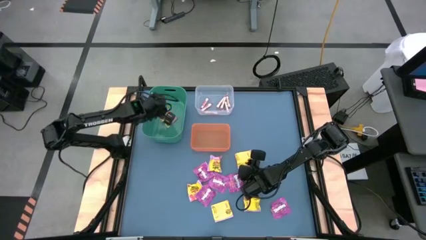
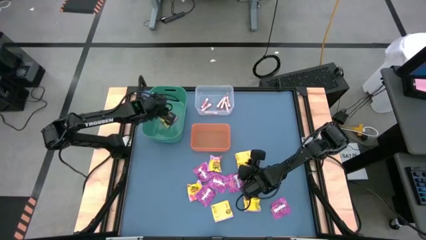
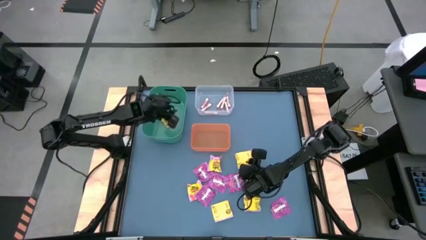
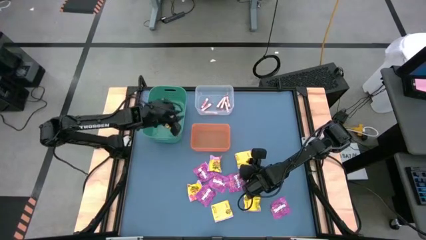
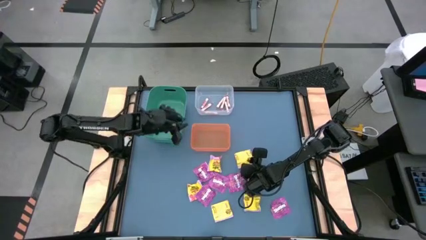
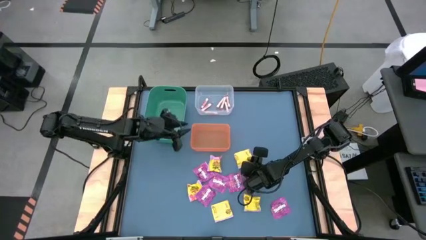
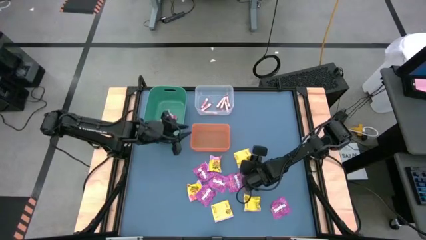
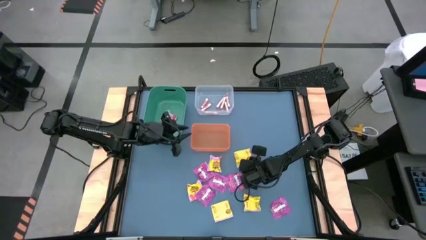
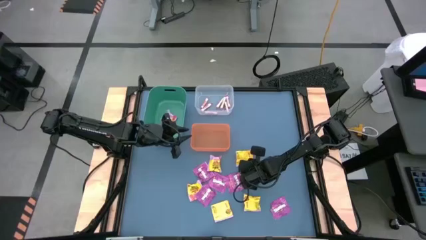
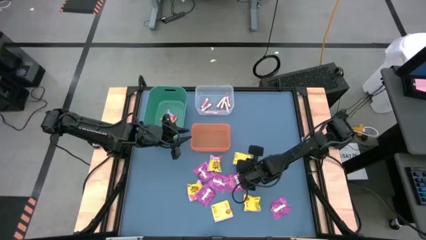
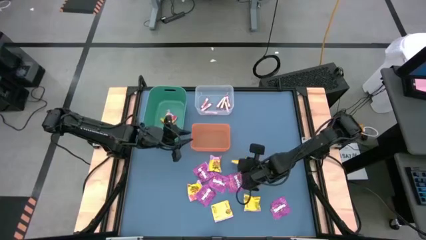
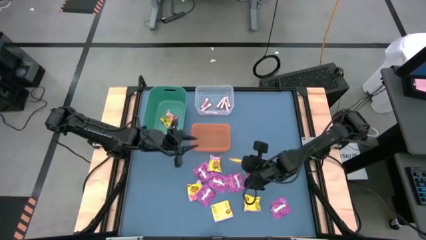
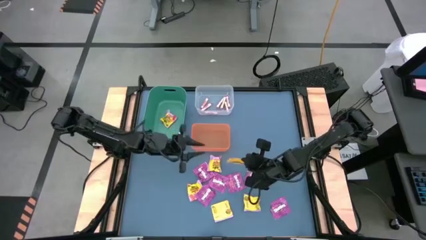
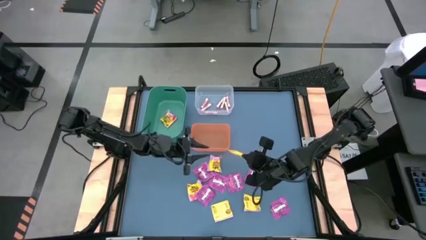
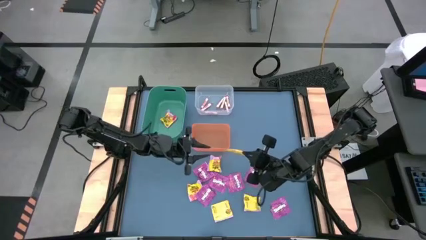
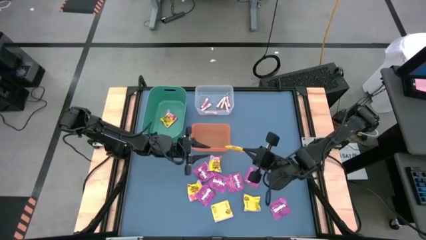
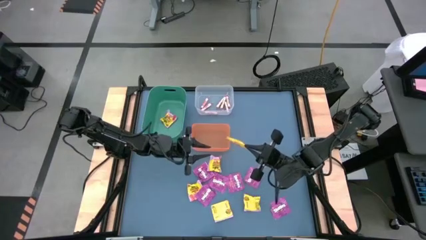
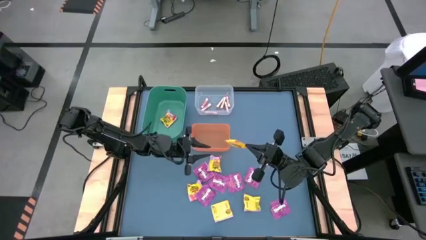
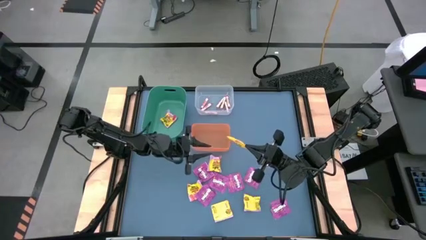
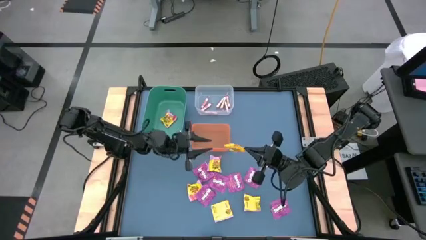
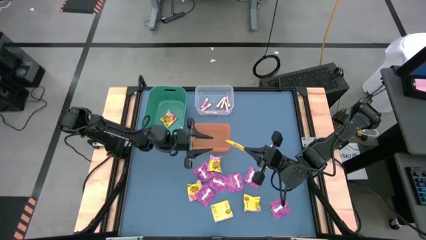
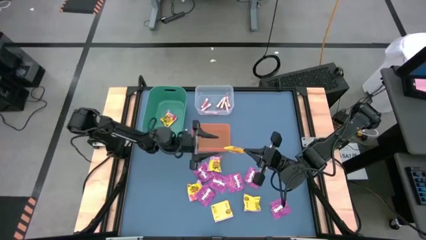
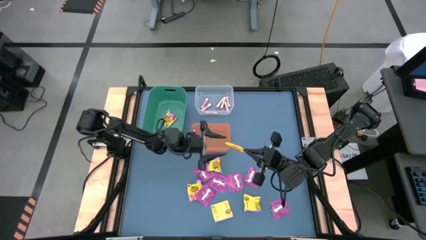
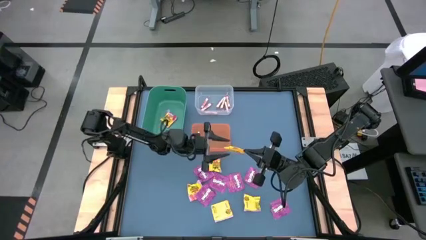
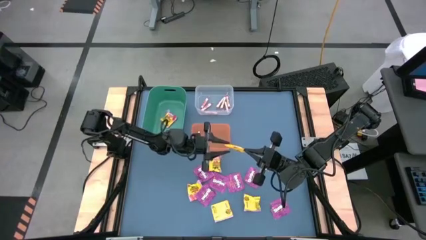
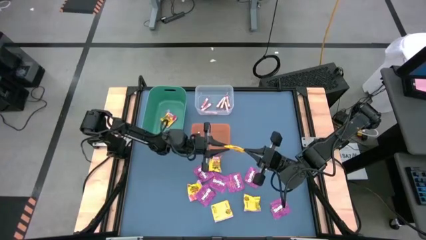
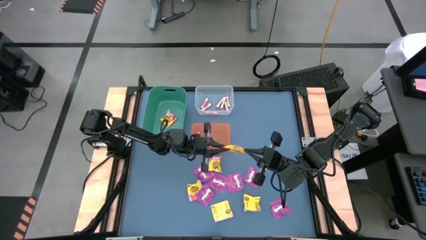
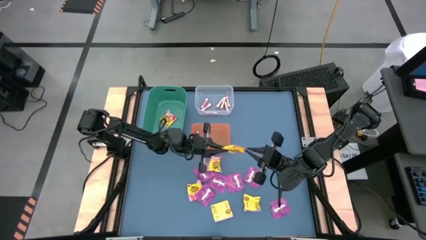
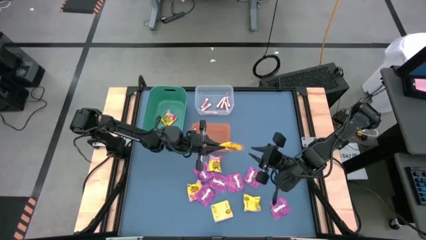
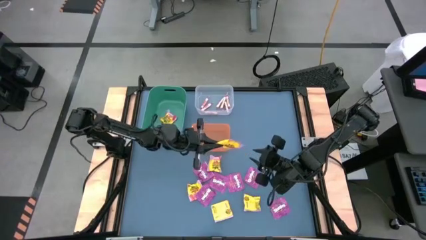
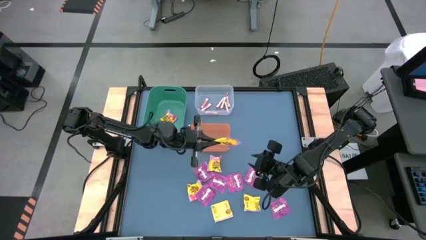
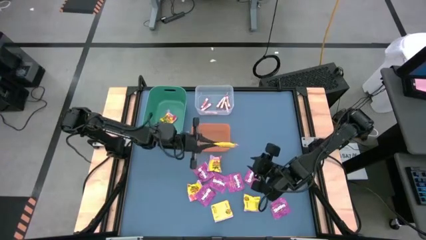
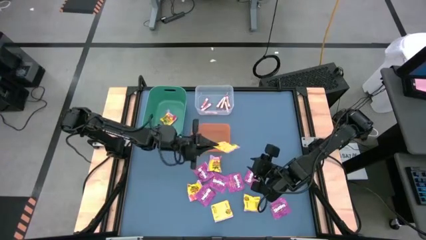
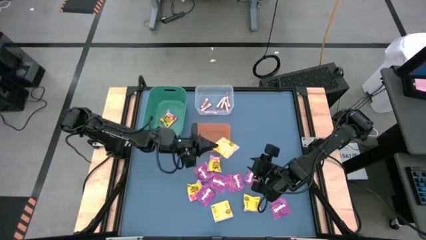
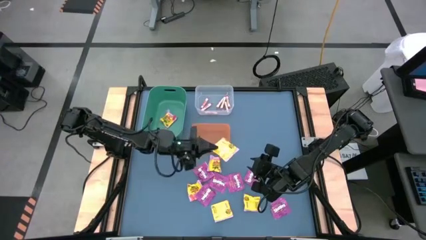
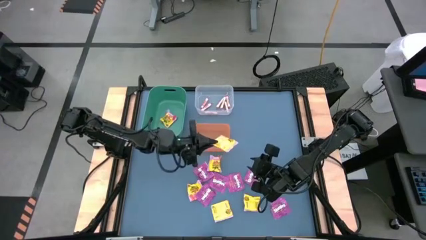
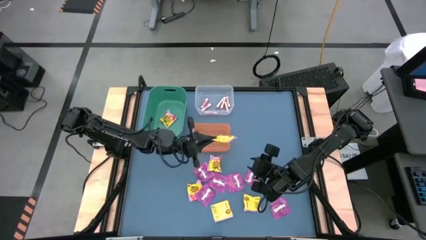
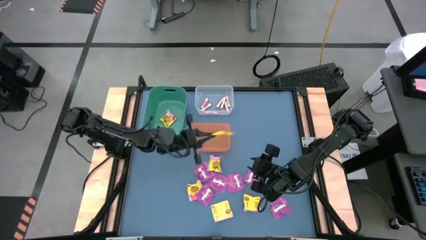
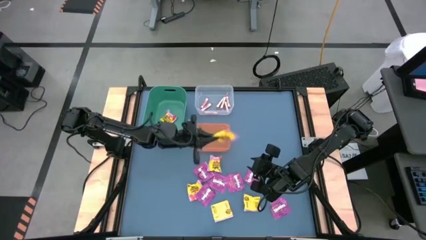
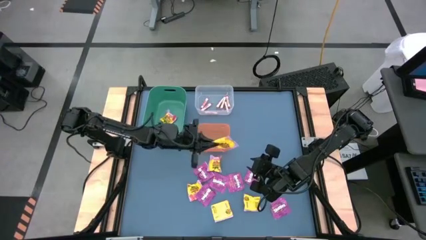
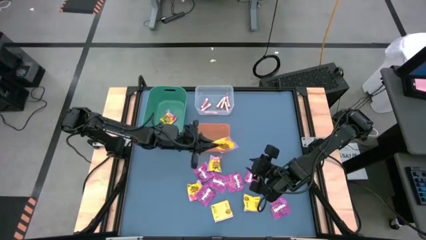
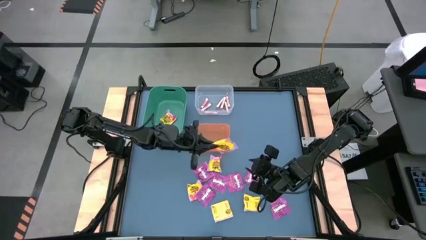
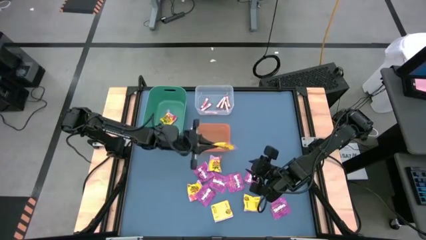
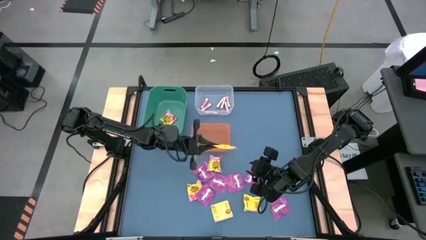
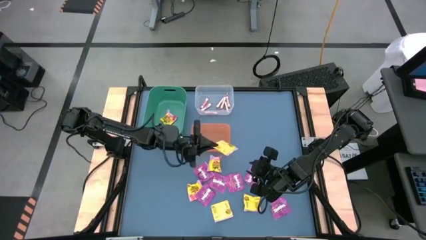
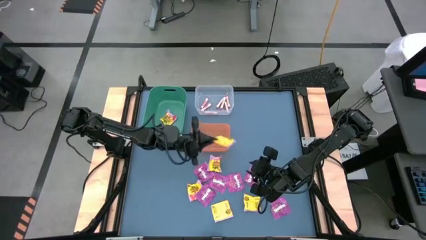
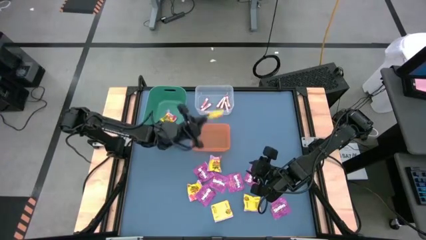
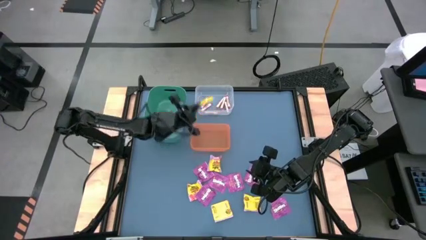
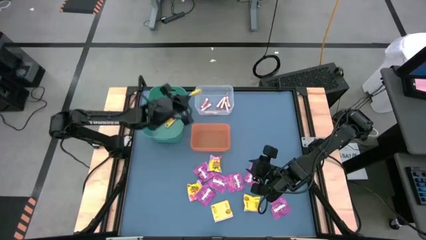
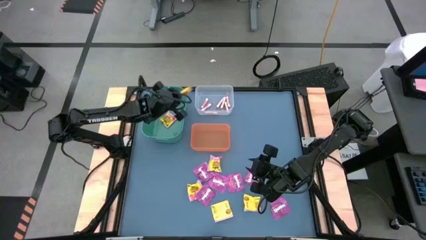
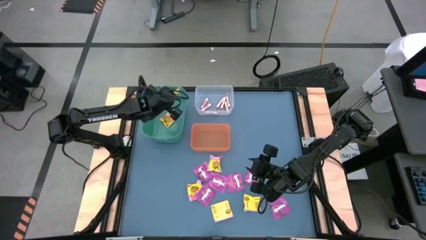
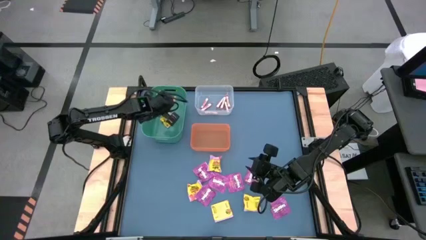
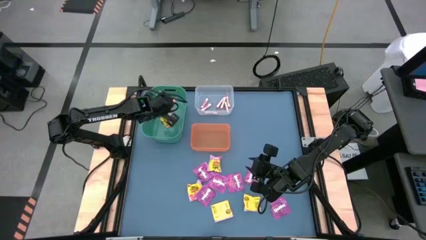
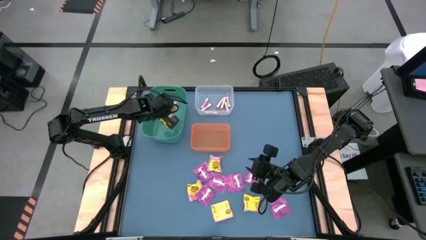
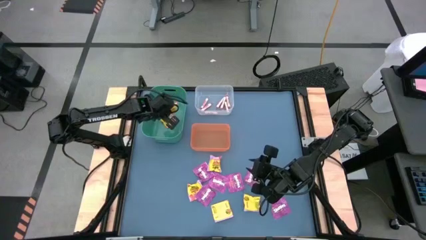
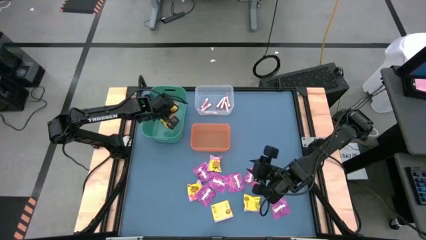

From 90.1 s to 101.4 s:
Task: Sort candy
Put the yellow candy into the green bin

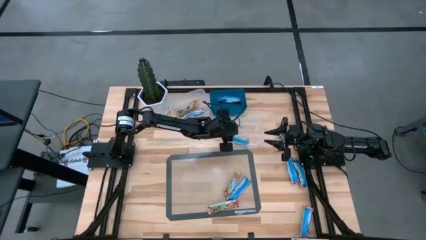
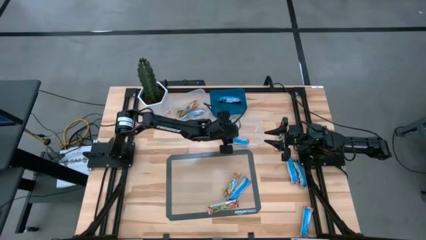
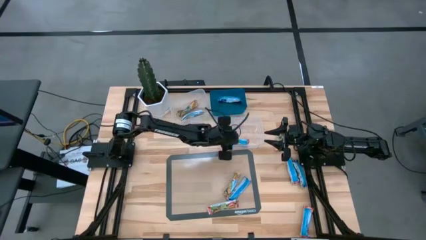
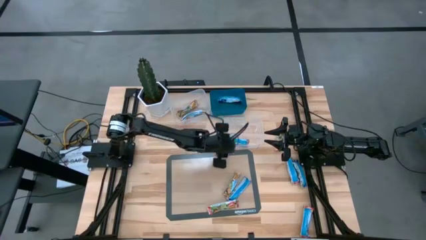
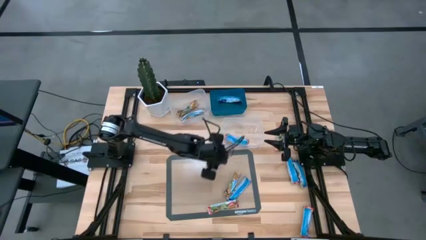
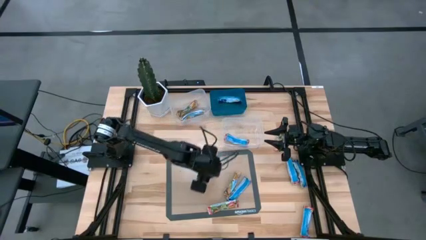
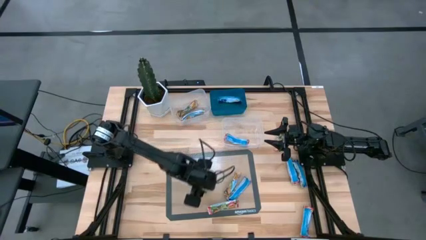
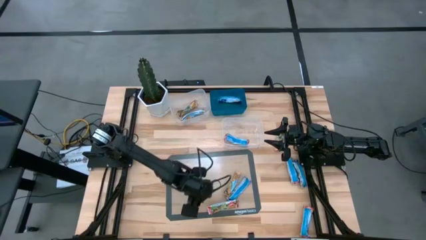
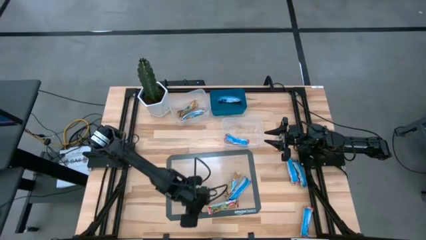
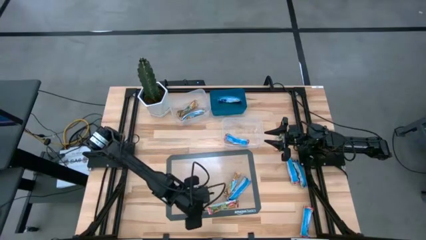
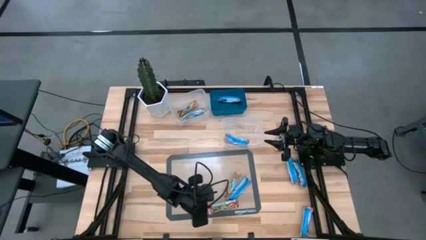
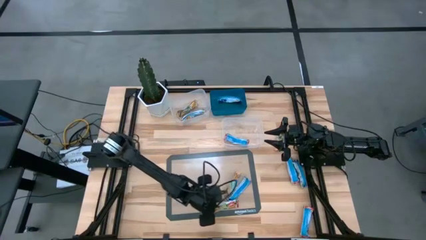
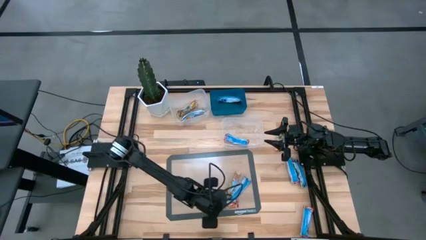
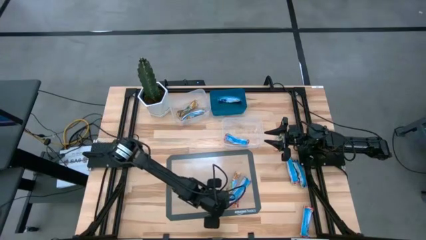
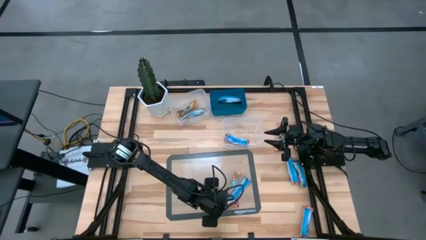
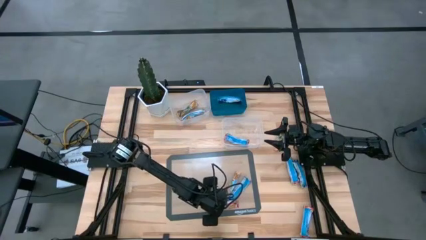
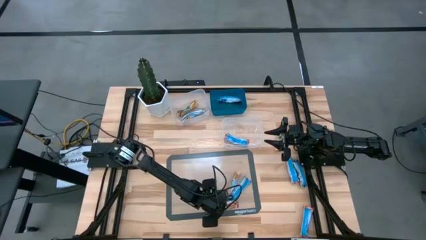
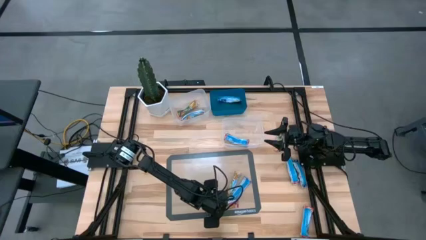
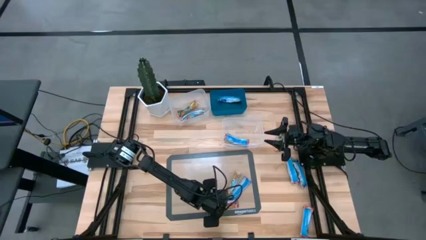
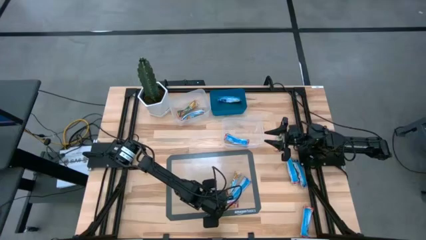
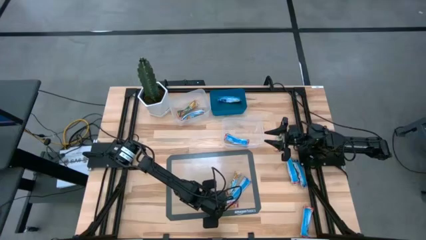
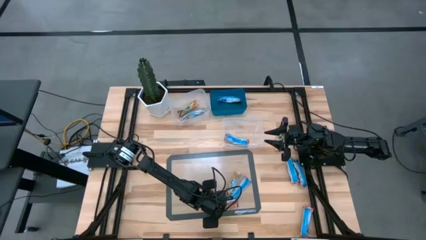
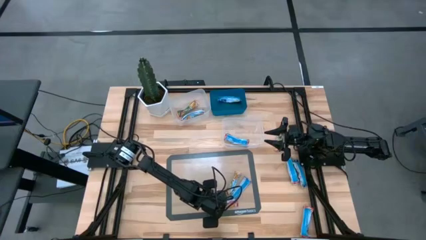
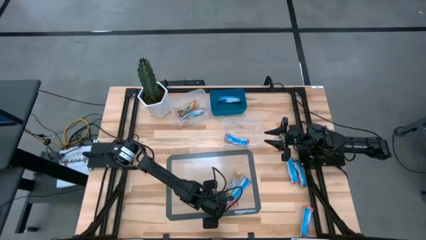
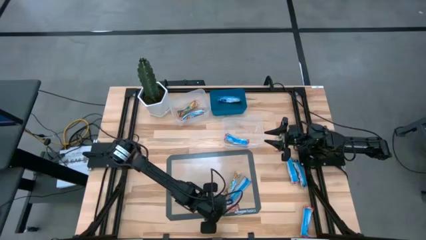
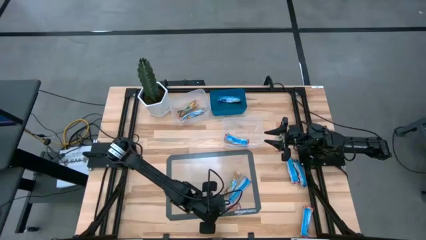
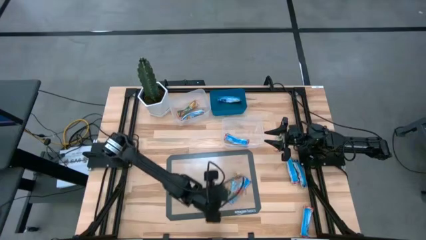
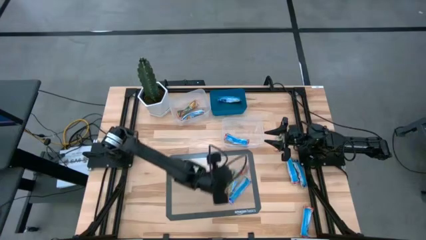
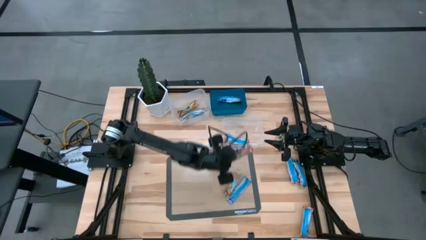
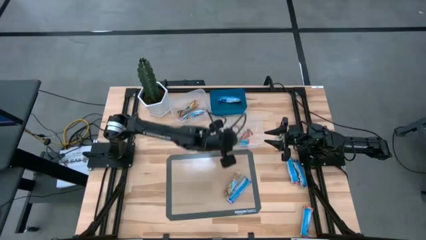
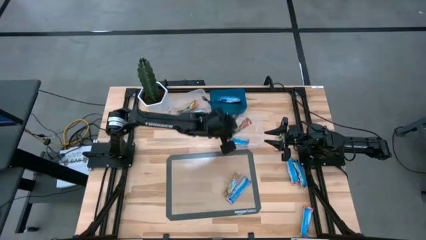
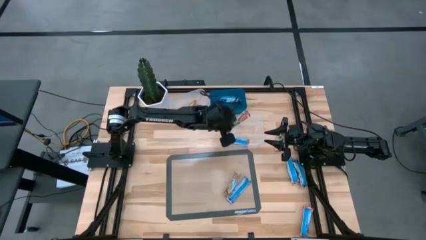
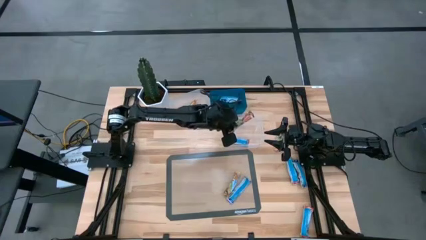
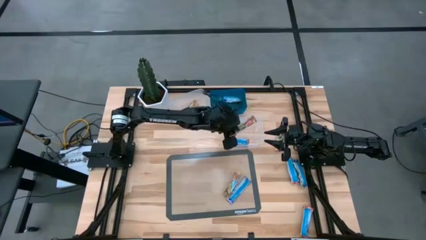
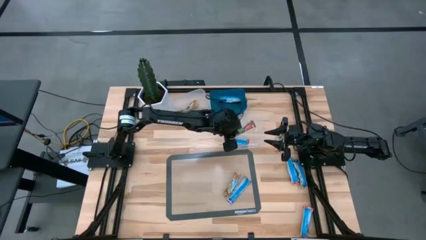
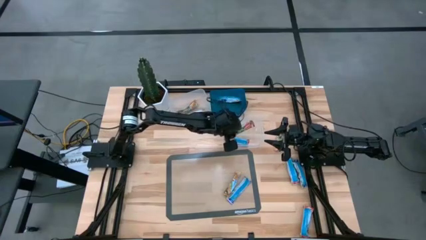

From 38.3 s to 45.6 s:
Task: Pick and place Granola Bars by type
Put the red granola bar into the bottom transparent bin
